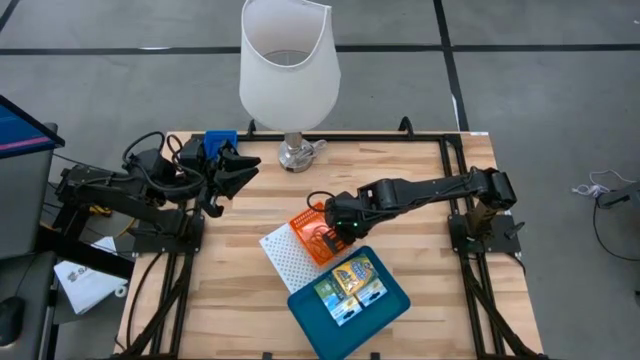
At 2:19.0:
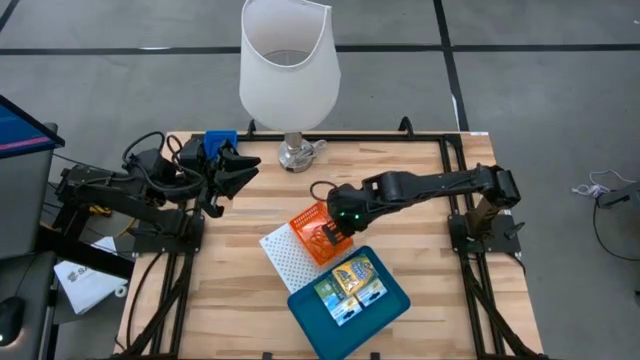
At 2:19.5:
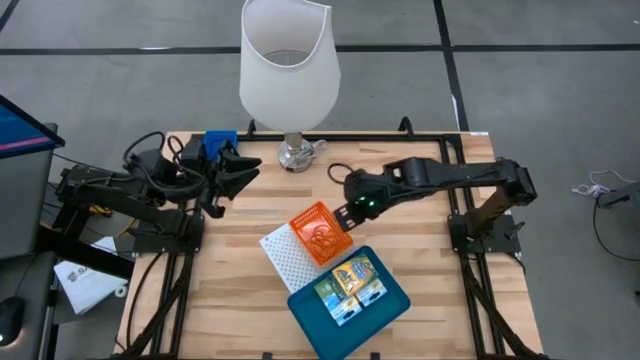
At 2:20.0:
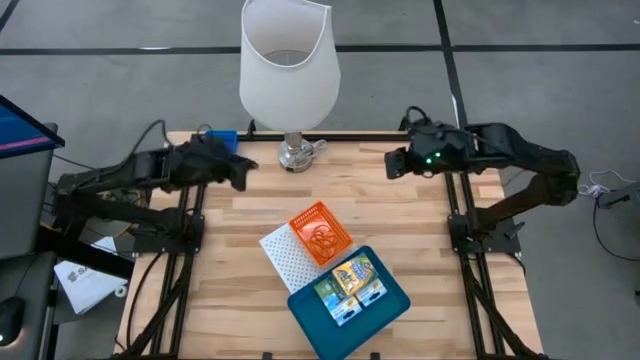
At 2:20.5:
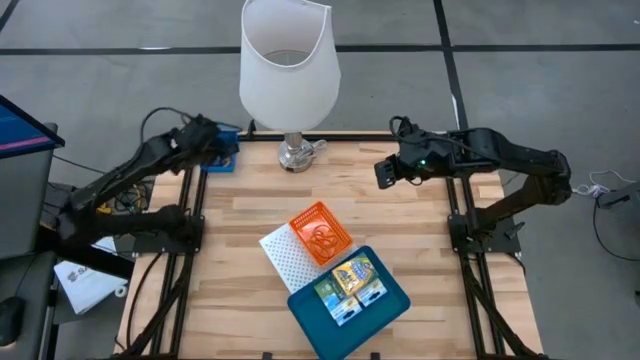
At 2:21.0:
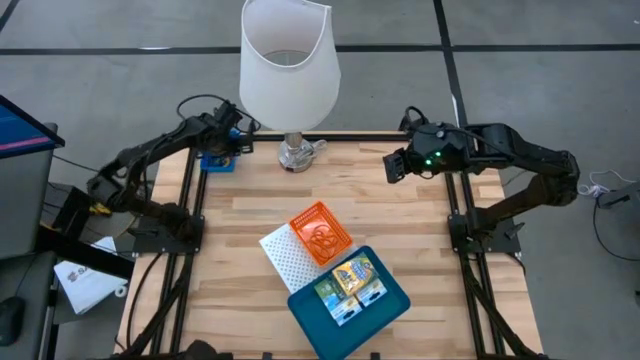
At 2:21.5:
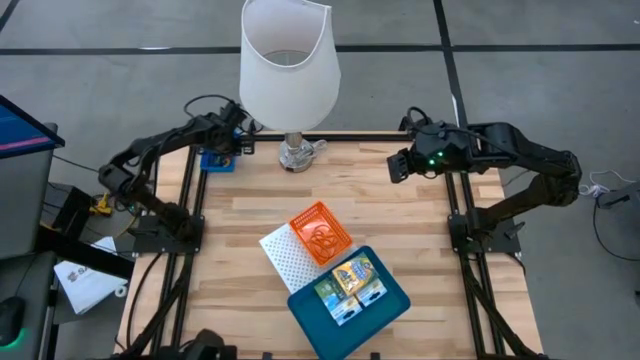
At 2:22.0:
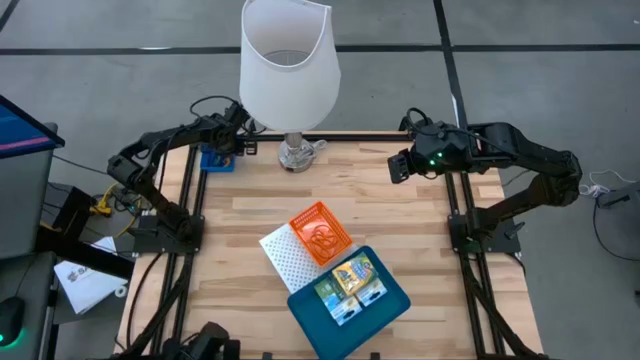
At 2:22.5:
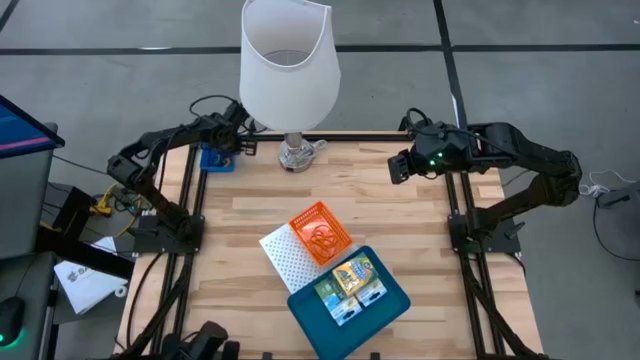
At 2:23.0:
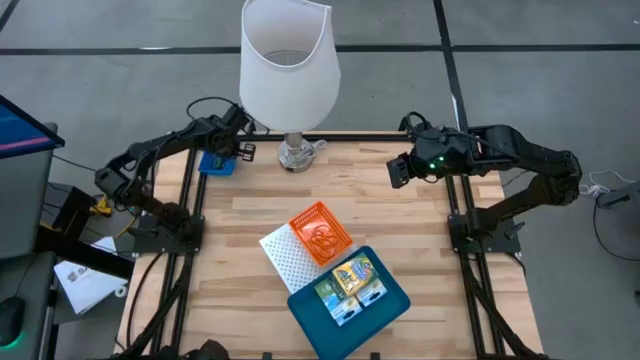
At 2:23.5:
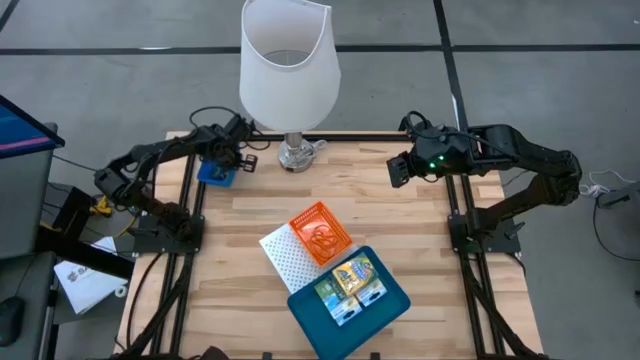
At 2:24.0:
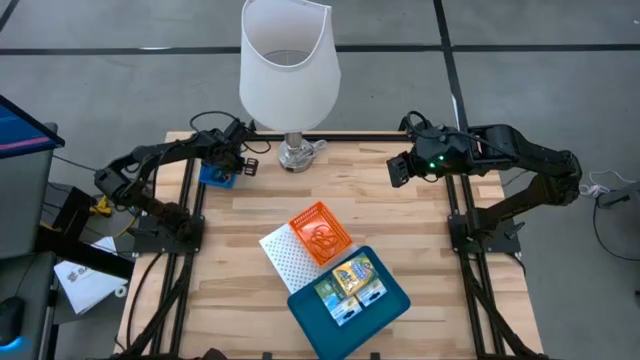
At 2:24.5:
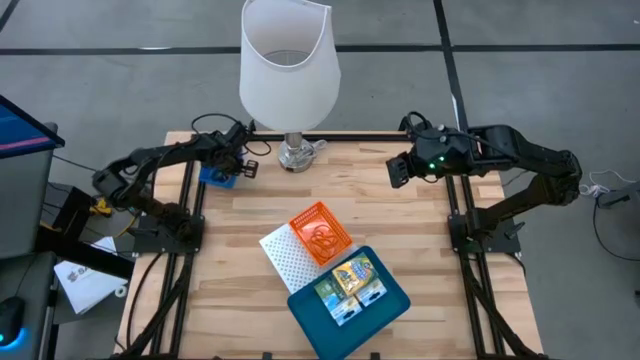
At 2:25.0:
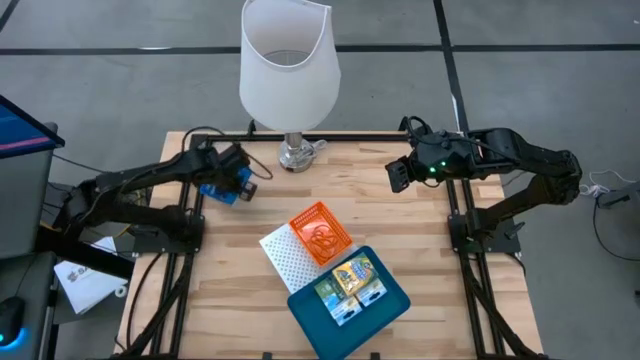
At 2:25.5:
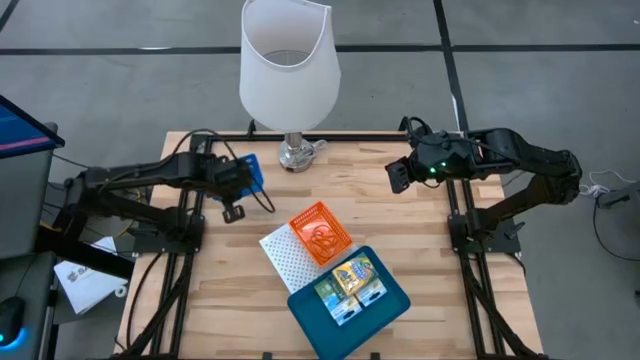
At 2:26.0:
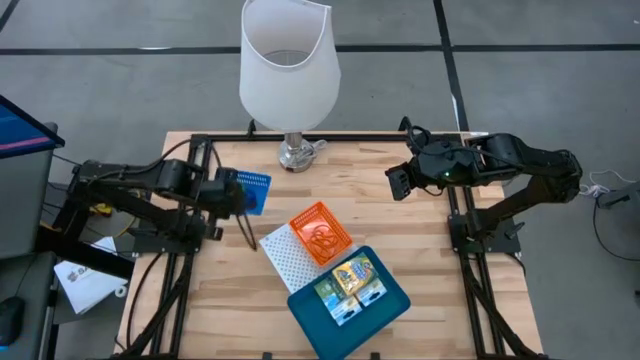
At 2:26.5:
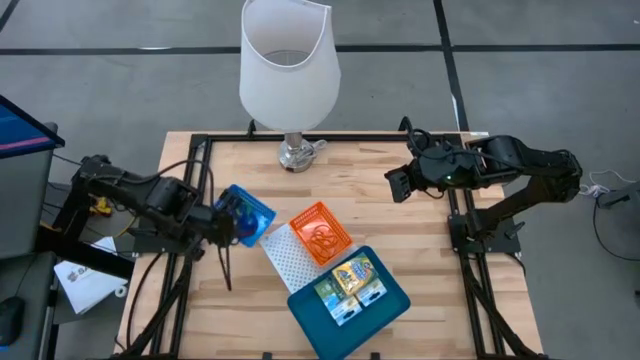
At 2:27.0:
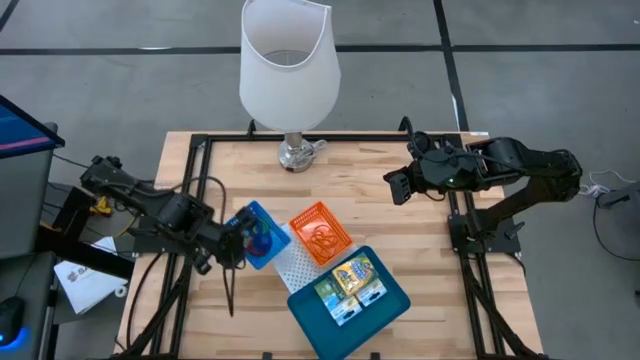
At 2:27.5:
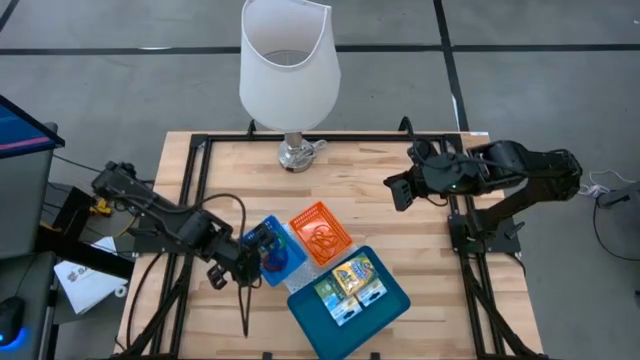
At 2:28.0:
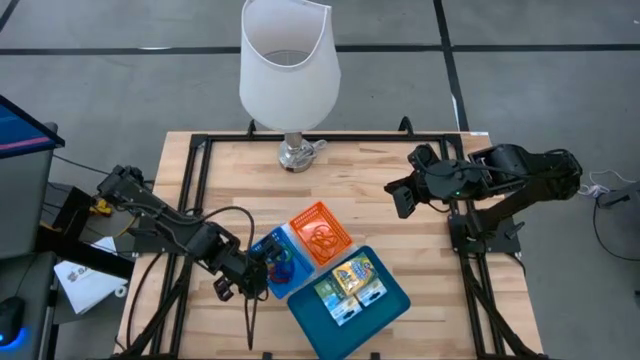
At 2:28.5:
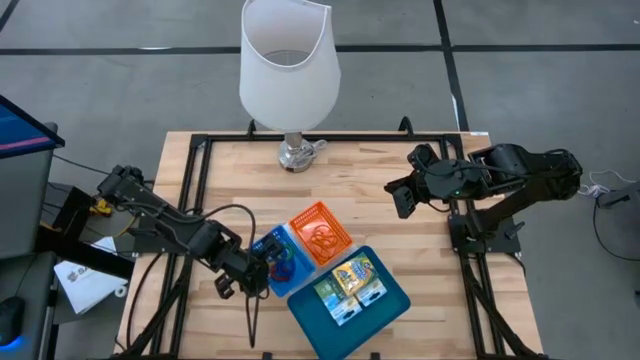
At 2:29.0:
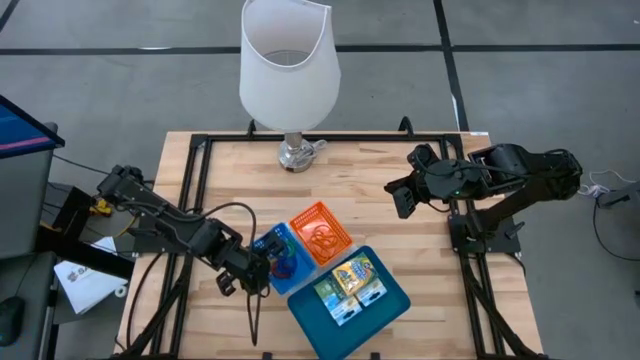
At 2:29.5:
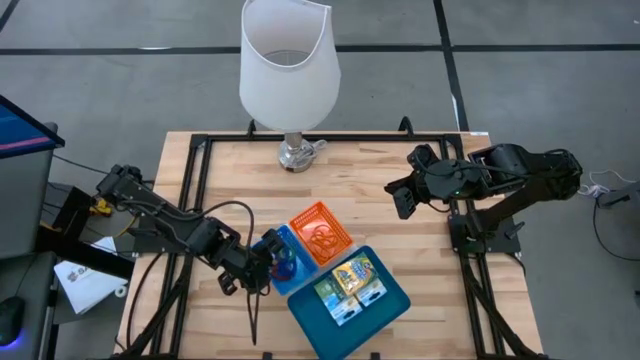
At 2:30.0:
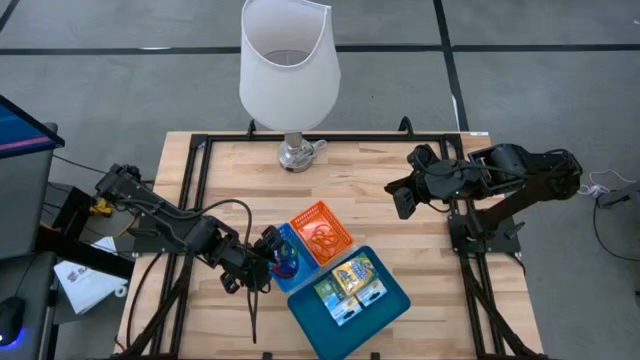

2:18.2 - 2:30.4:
Task: Pick & Place Office Desk Supplies
Put the blue bin on the shelf

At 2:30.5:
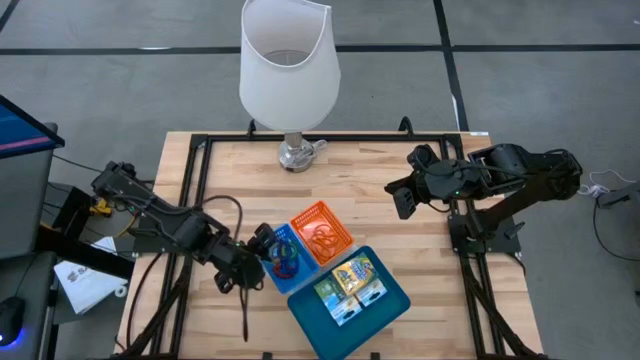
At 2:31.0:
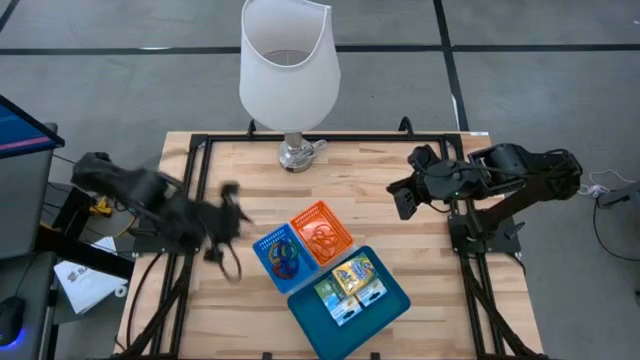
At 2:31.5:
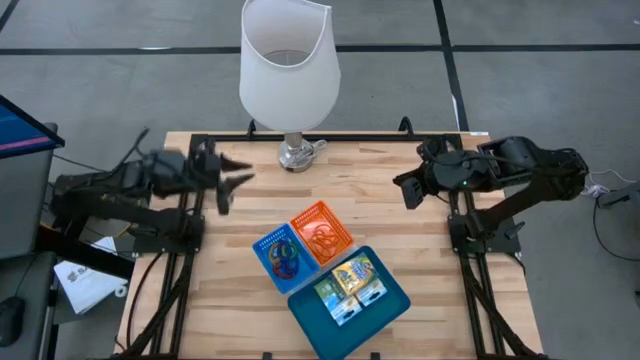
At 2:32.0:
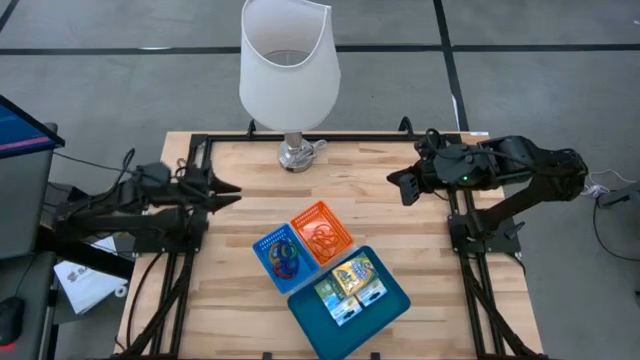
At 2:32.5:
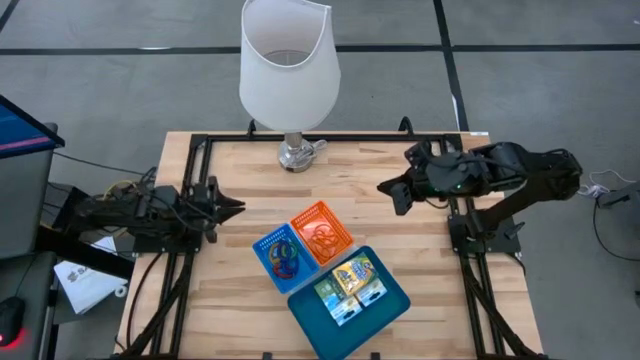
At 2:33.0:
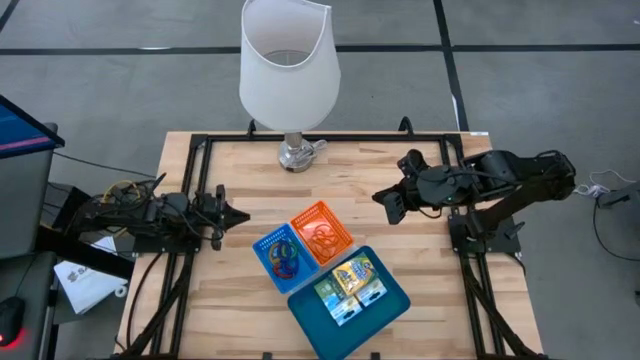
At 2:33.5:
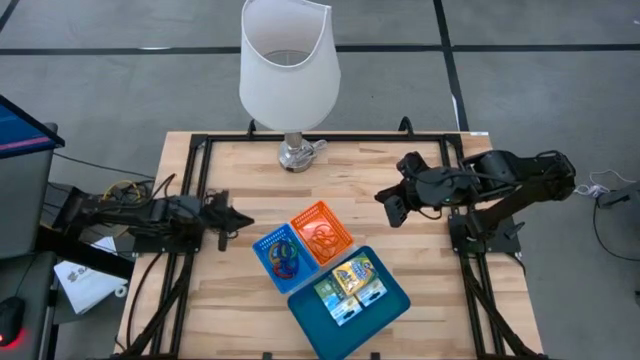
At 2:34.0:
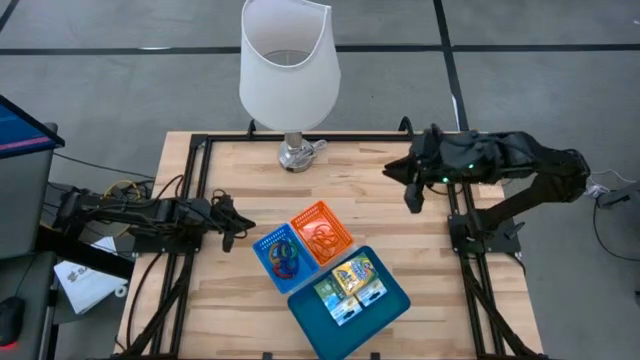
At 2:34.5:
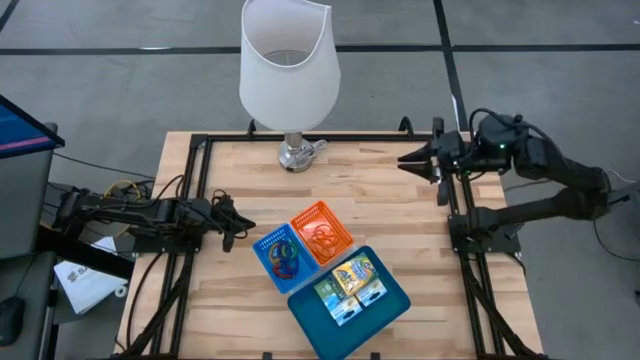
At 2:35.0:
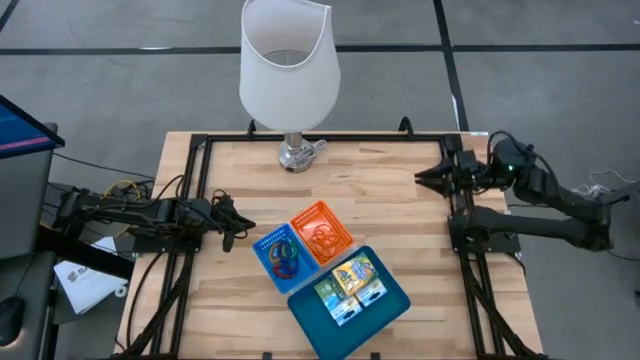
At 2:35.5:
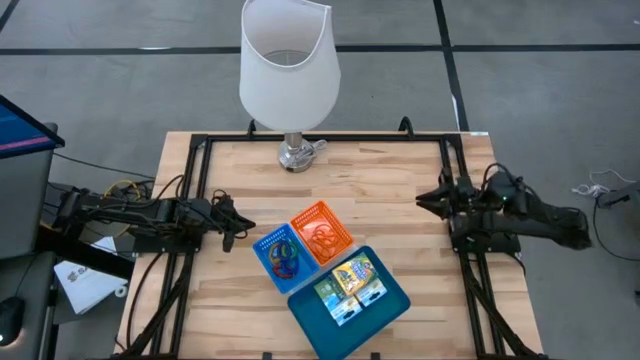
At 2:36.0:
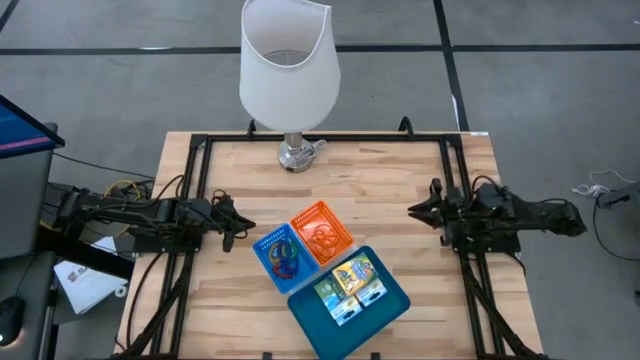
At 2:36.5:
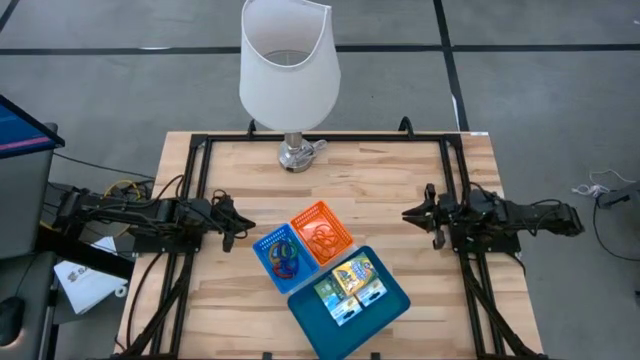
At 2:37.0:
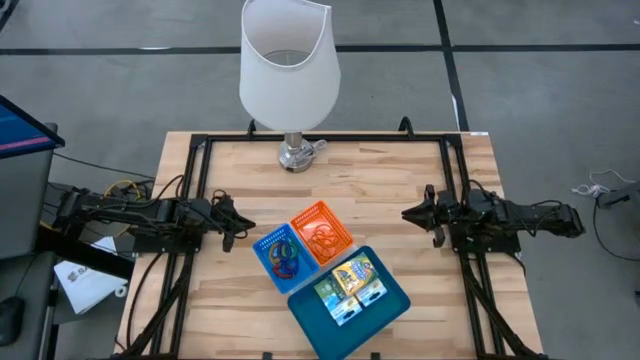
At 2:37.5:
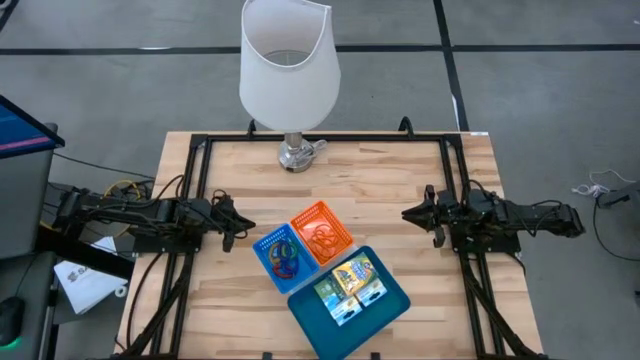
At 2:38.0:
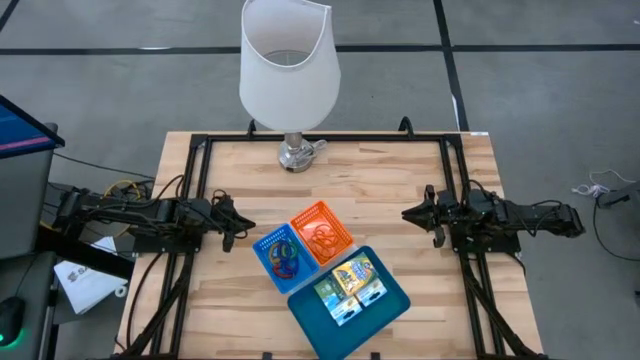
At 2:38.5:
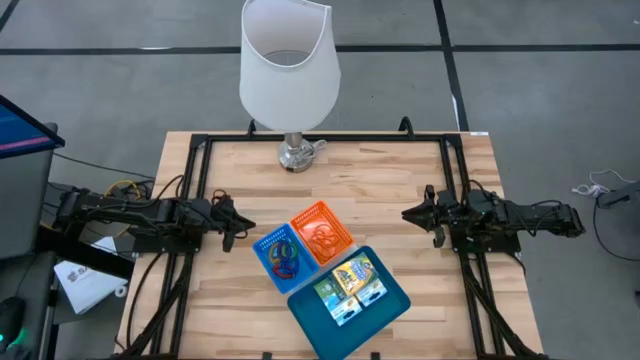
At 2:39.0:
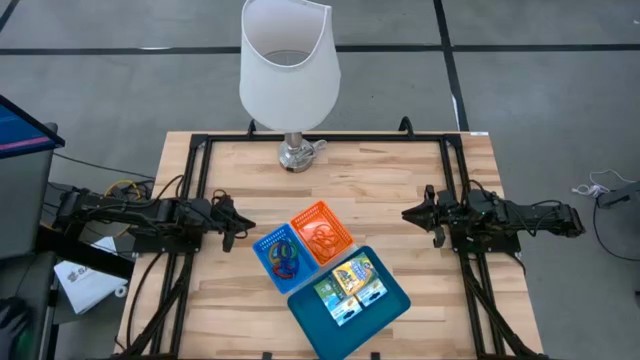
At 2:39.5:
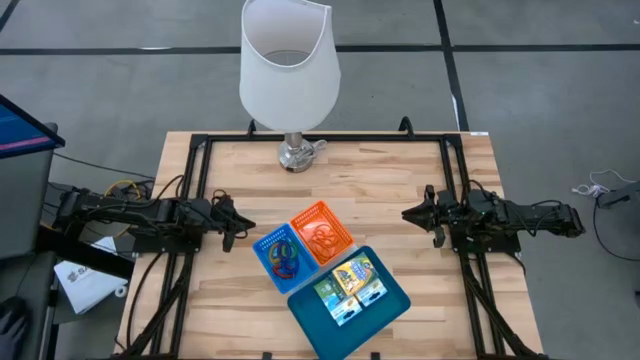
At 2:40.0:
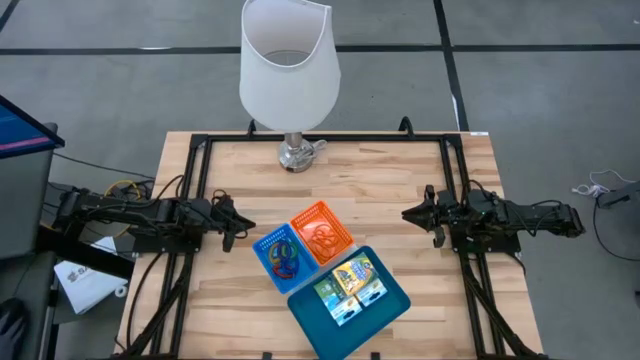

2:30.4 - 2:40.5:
Return to Home Position
